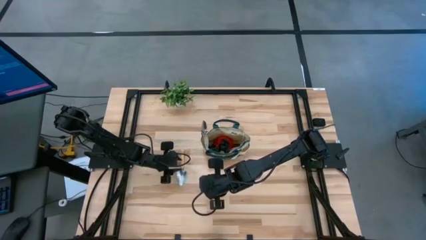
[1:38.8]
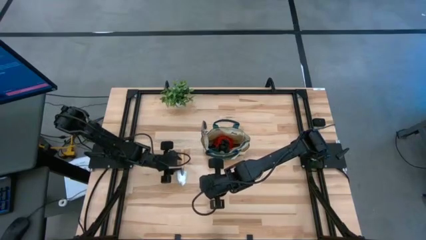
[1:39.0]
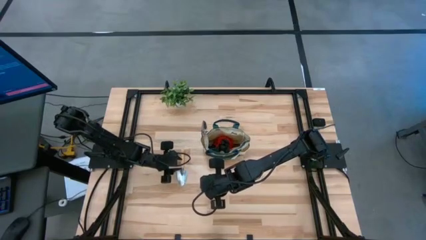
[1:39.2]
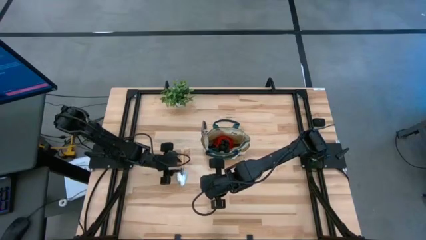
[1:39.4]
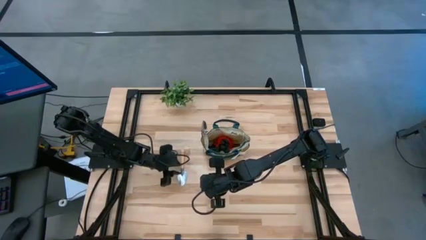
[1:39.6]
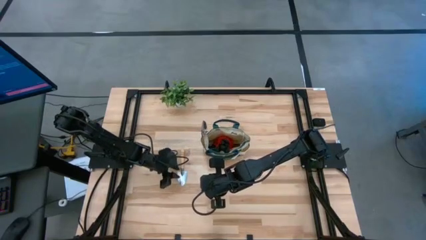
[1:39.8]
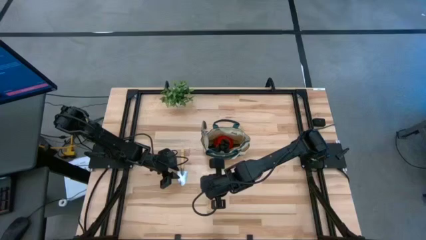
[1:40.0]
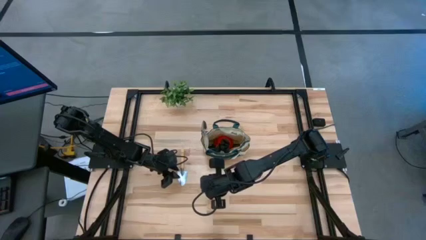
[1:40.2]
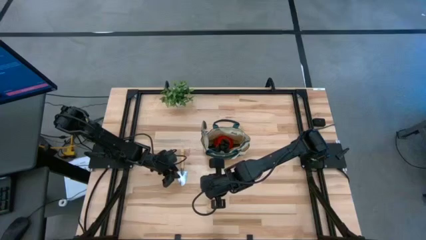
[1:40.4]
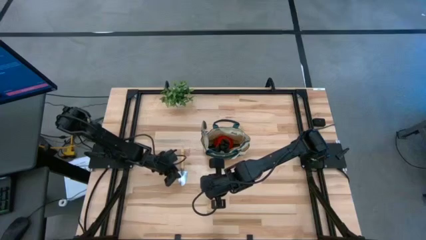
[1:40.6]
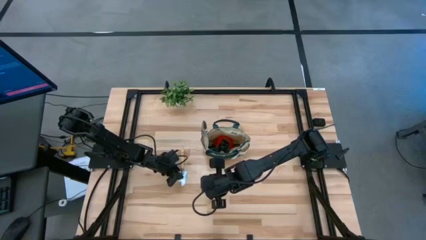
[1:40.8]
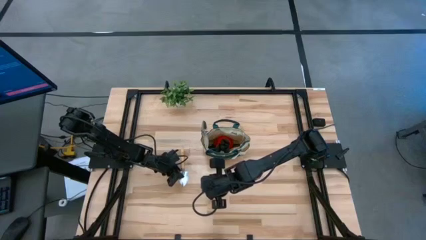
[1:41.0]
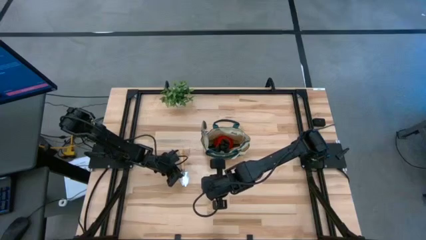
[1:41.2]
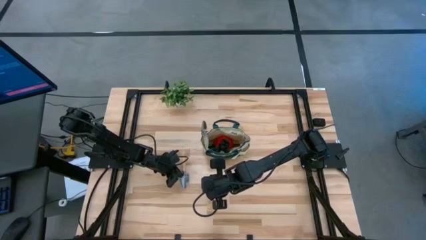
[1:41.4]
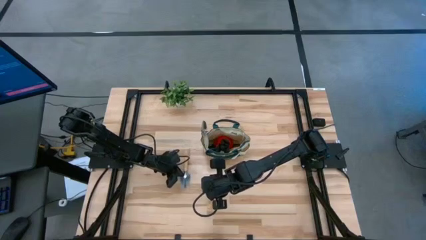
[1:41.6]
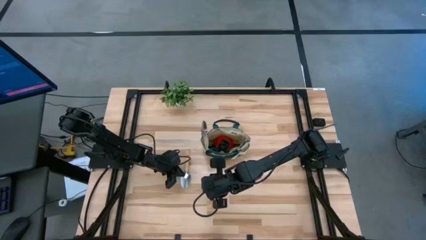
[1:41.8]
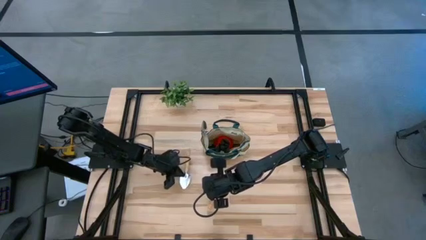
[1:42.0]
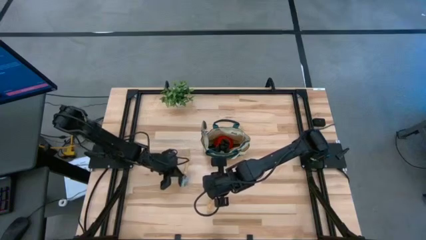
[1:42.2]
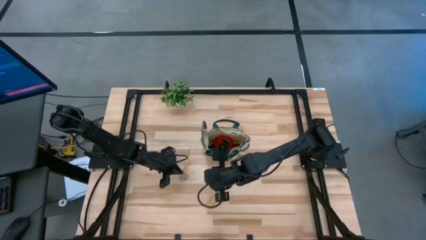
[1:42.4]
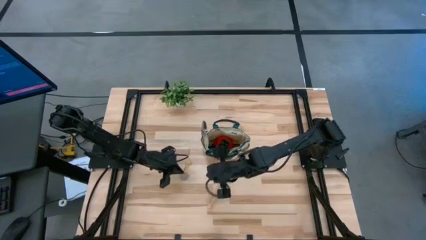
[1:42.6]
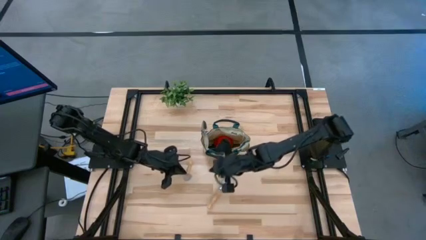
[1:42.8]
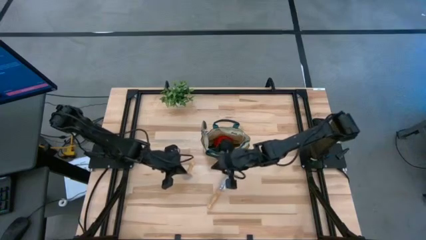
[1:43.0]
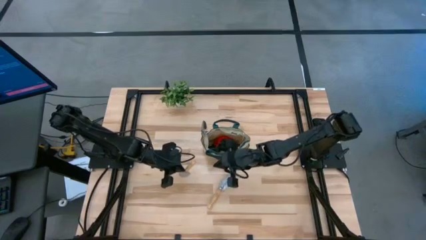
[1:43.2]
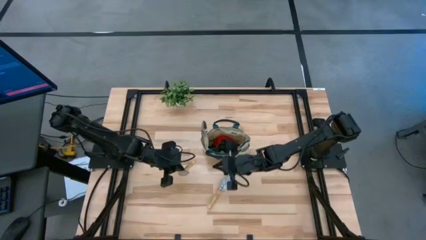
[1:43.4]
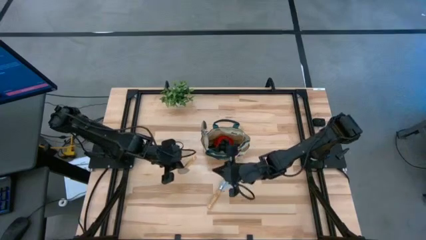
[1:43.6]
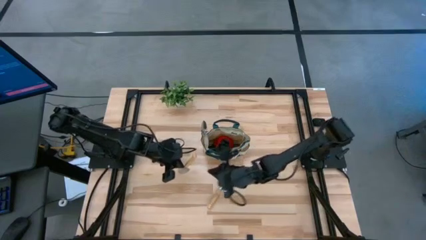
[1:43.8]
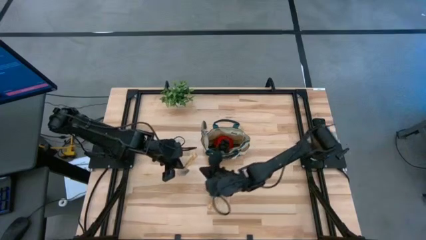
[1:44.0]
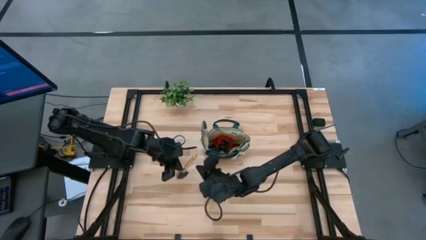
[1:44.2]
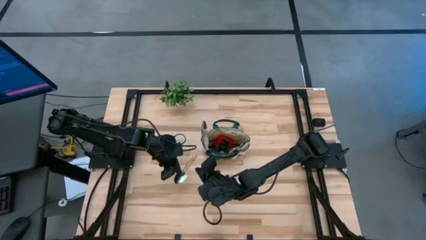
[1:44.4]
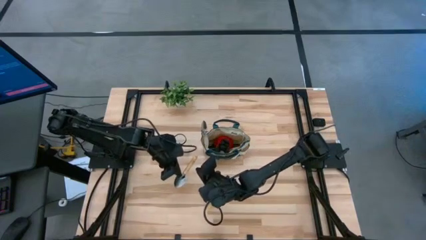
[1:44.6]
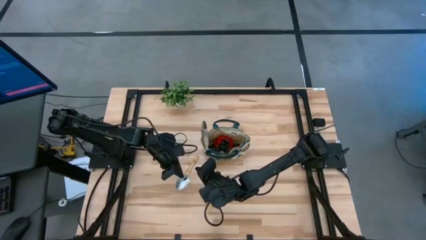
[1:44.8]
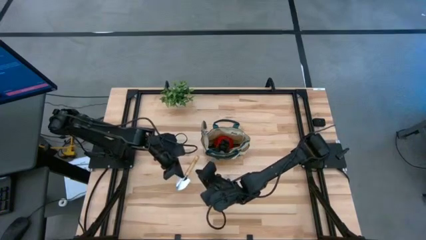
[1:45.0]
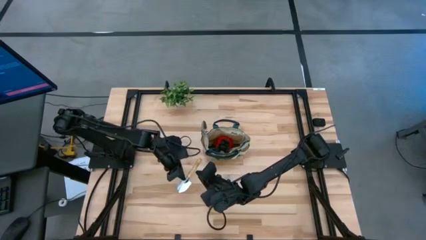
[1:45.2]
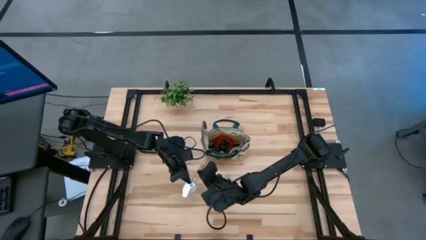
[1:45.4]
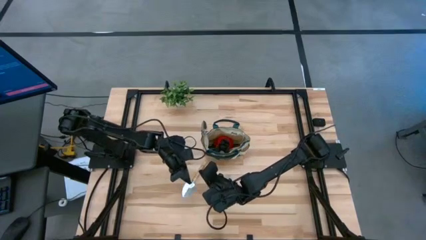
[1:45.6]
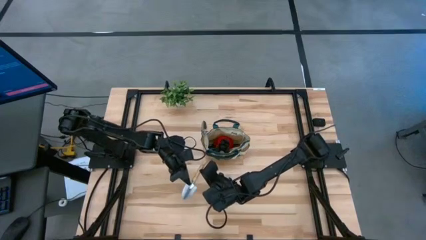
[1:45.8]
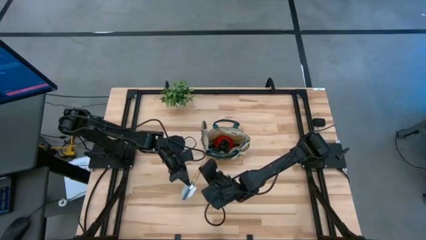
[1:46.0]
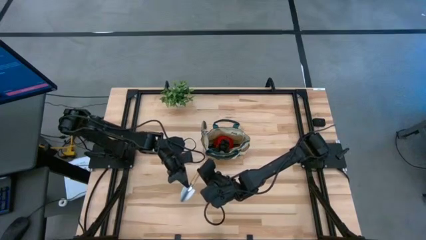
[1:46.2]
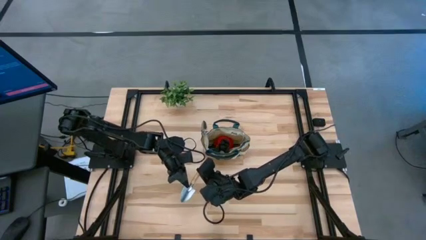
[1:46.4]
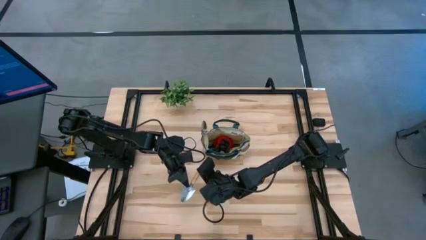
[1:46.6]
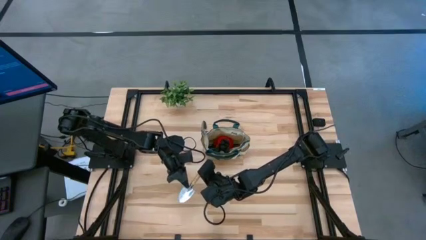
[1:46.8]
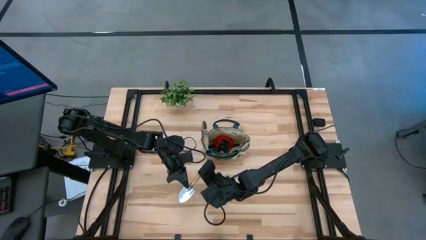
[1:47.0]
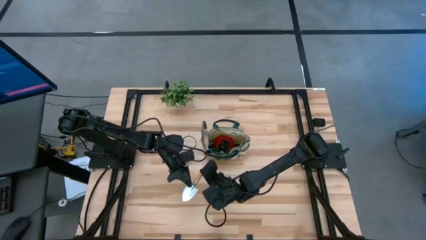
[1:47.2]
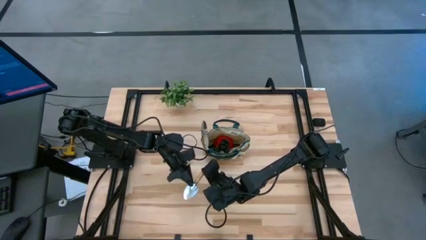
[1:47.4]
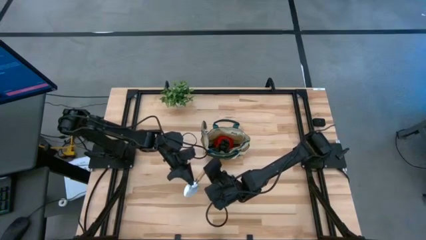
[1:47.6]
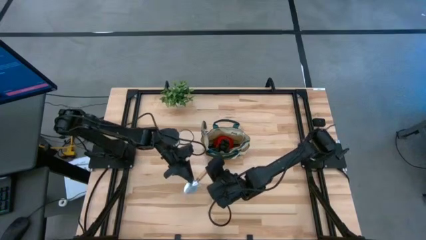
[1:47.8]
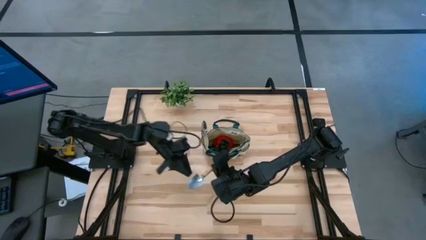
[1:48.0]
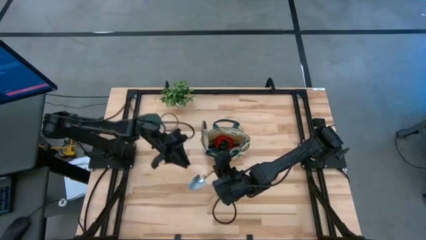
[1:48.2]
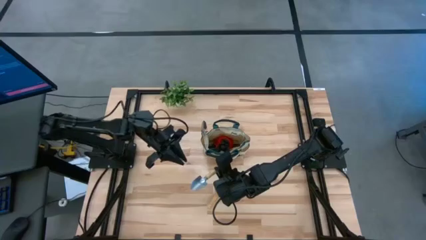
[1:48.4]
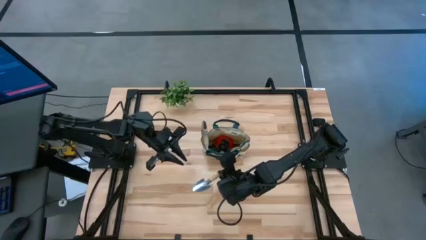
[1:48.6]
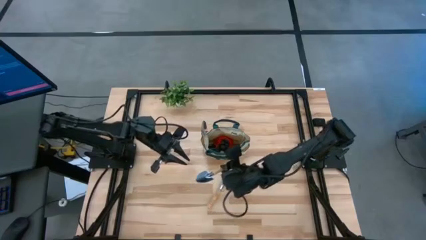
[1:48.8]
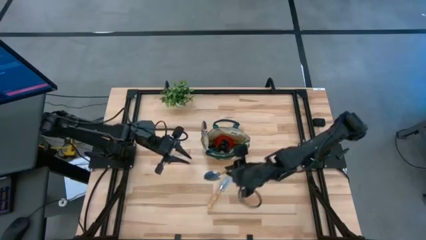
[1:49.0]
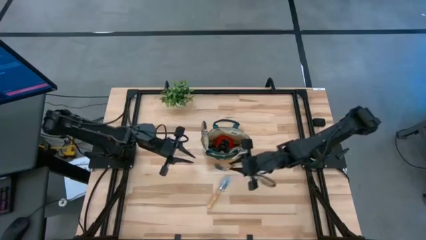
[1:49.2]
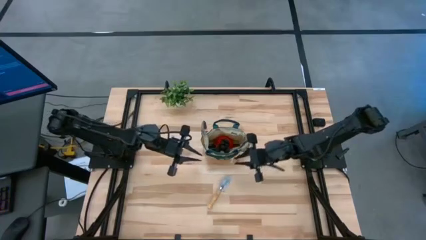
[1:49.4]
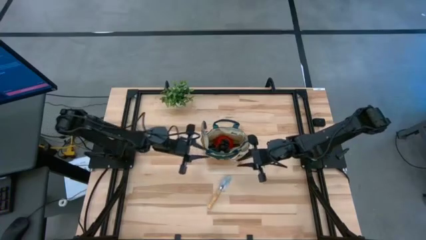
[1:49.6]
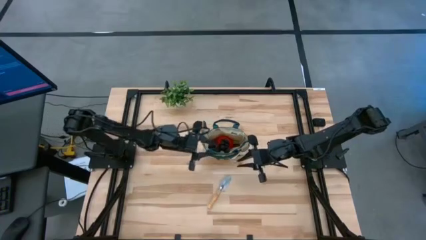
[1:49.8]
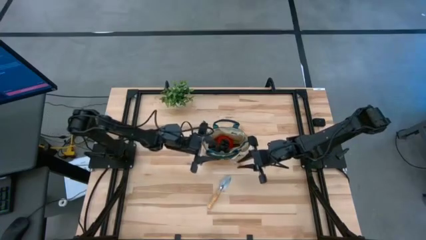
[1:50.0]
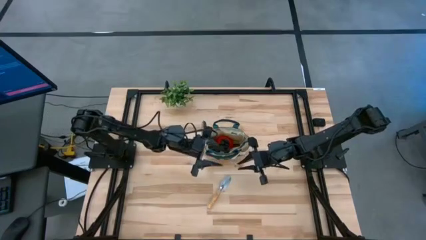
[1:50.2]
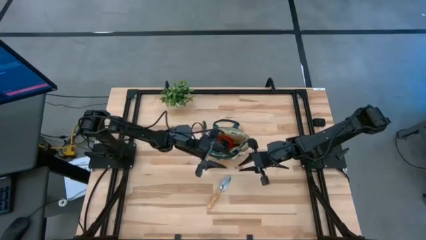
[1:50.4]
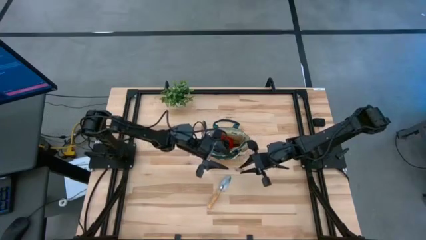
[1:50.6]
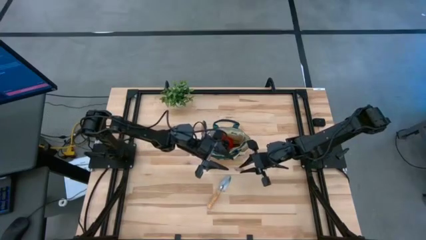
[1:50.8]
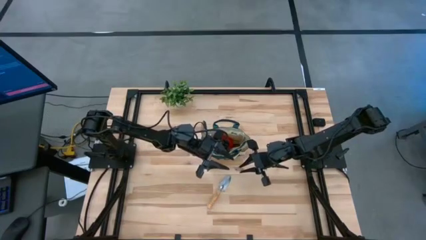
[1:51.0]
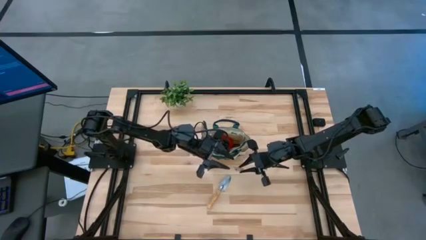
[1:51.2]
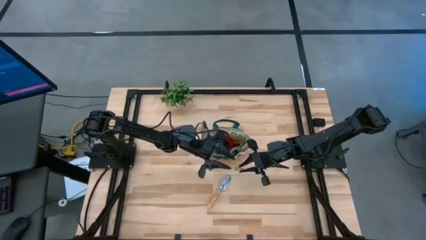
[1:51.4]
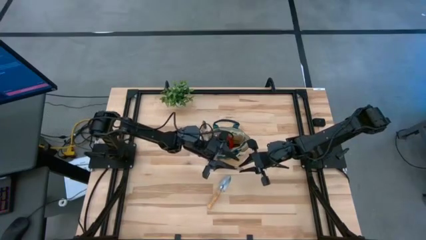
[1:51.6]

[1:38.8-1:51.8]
Task: Pick & Place Garden tools in Gardening bag
Put the trowel into the gardening bag

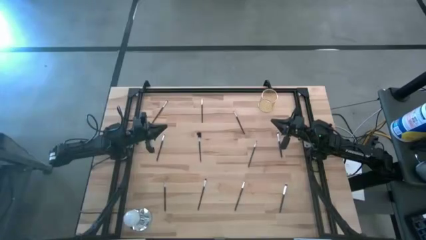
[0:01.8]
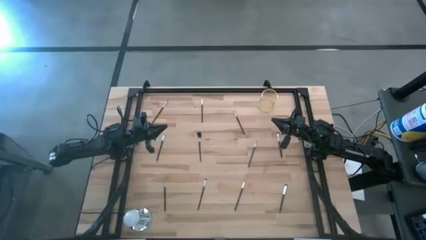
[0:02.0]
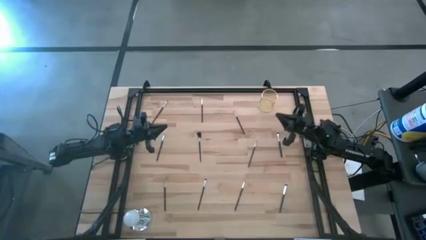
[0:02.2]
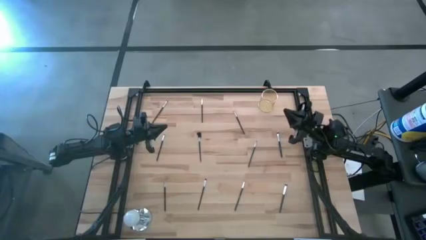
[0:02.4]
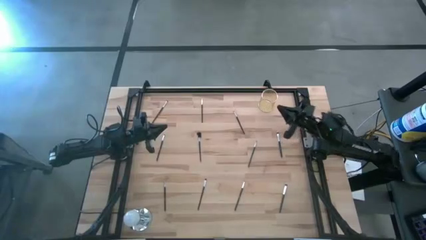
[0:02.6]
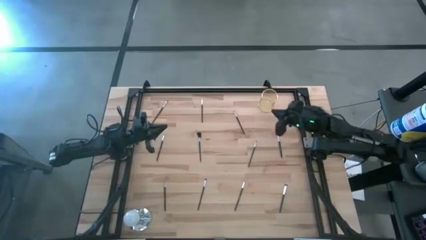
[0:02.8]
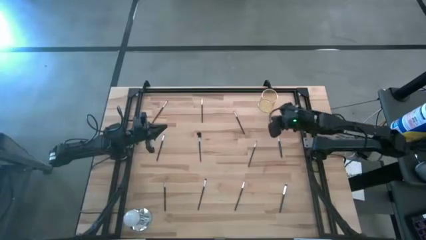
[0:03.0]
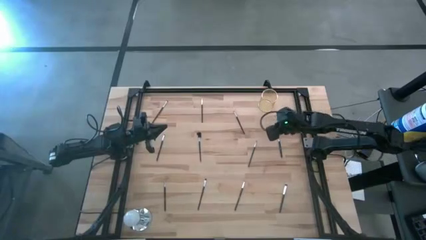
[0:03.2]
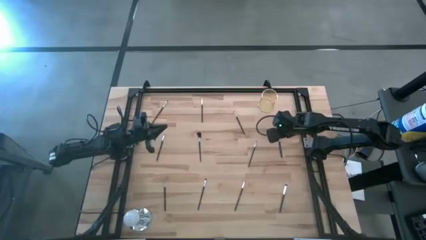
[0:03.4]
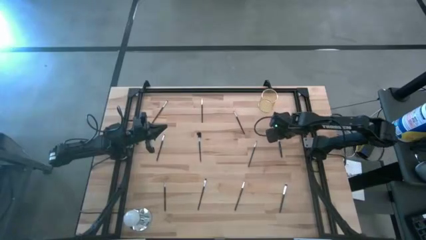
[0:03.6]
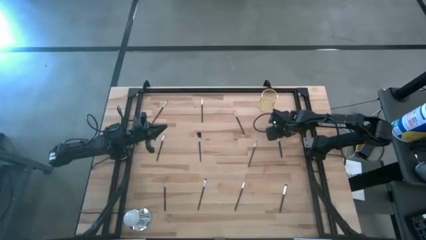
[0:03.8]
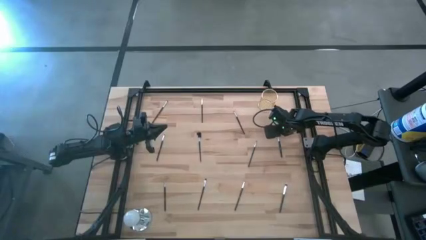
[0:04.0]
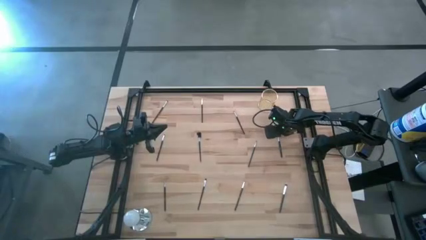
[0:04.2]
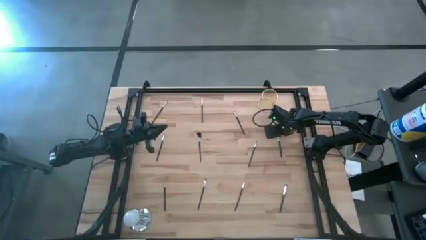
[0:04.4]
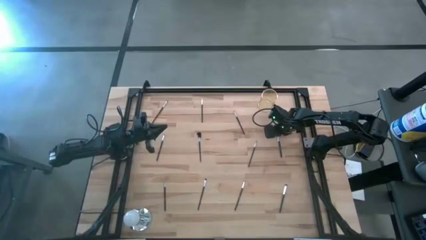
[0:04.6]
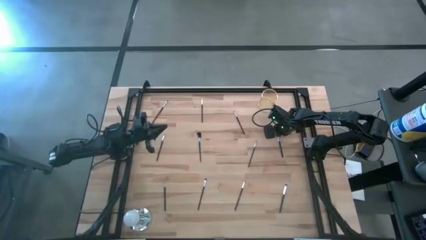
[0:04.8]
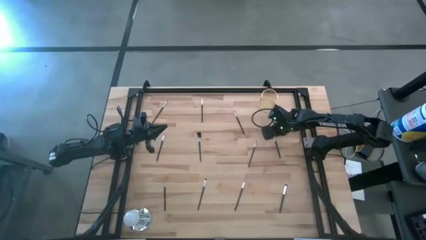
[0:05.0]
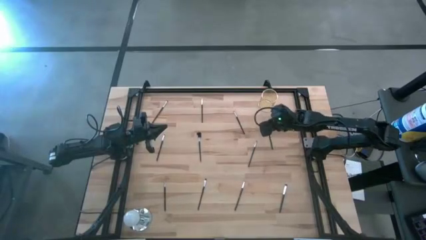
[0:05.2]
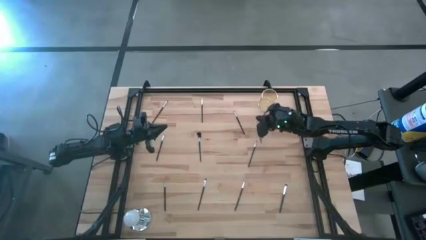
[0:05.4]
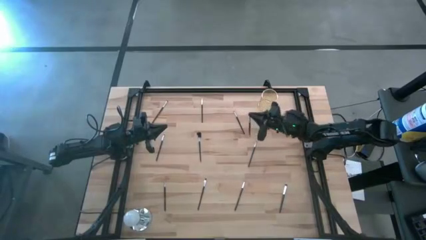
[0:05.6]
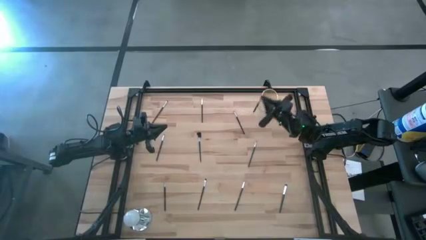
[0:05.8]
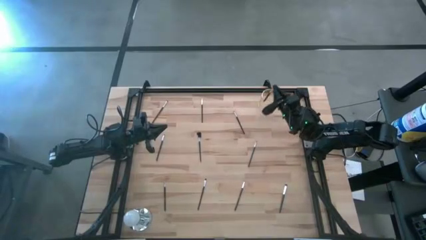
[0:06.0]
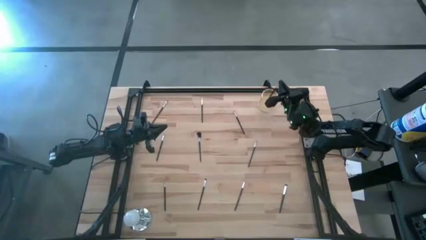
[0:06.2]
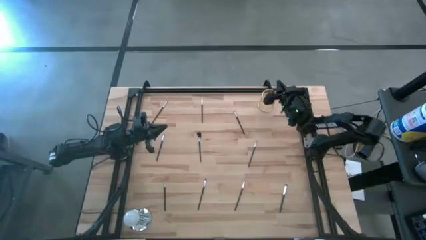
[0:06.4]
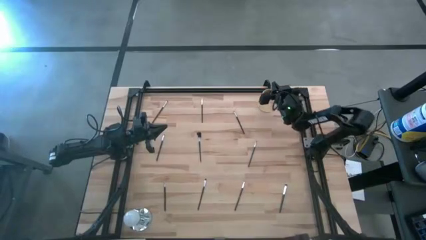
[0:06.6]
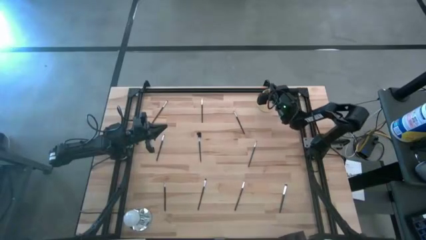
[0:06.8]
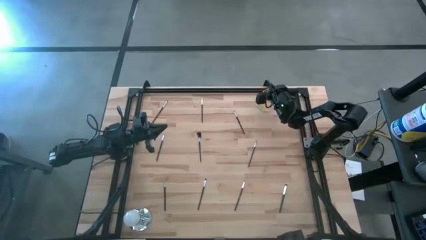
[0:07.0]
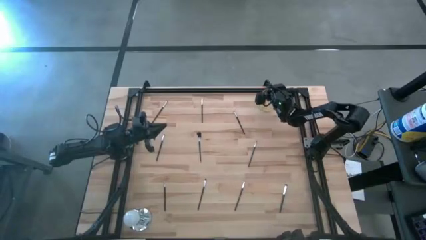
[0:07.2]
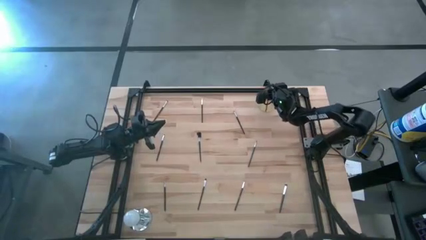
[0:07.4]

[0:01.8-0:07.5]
Task: Put items in baskets/containers
Put the black eyeshadow brush into the gold pen holder
